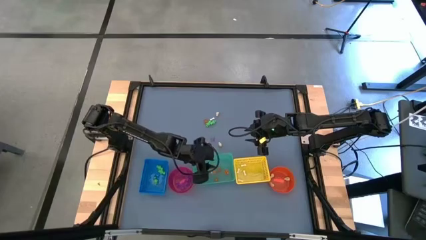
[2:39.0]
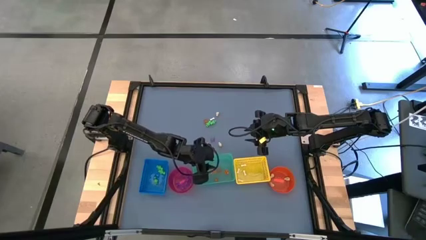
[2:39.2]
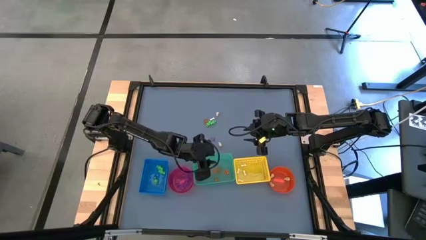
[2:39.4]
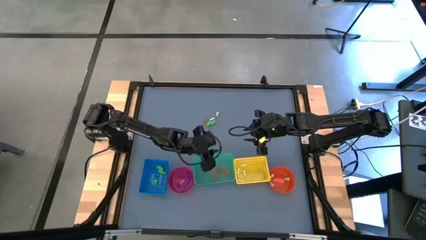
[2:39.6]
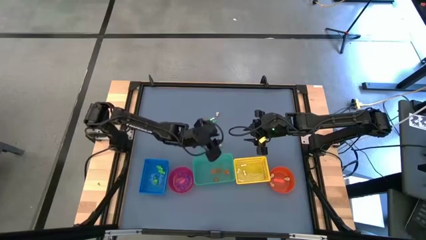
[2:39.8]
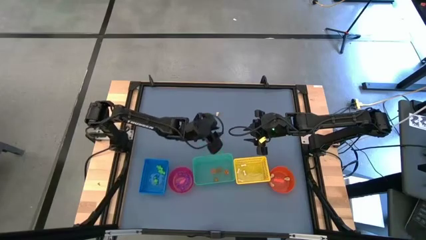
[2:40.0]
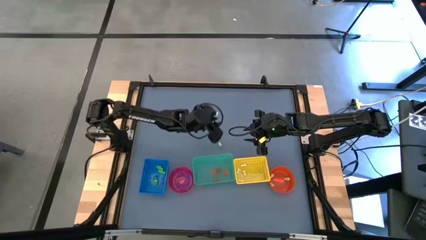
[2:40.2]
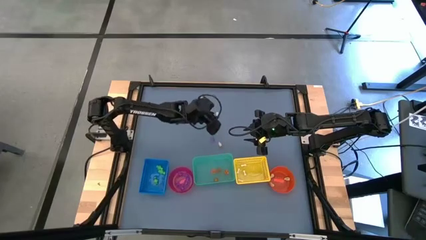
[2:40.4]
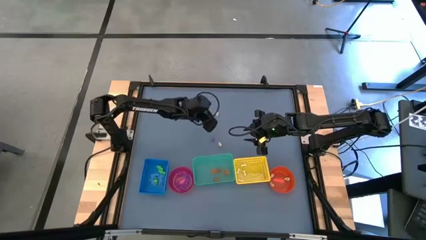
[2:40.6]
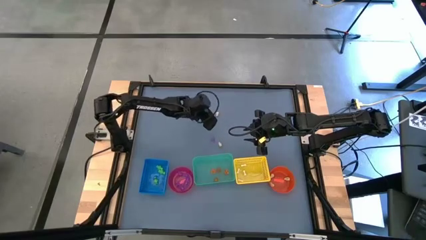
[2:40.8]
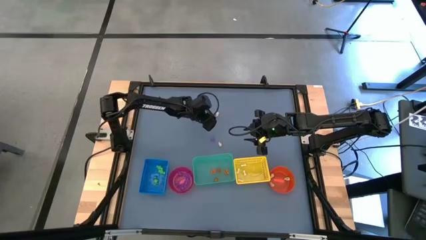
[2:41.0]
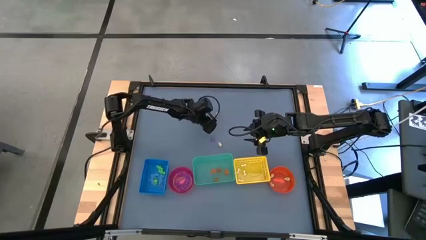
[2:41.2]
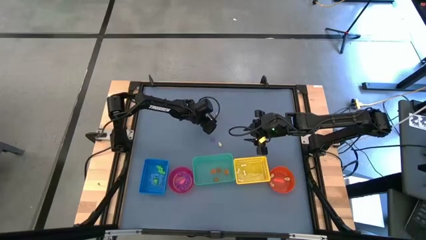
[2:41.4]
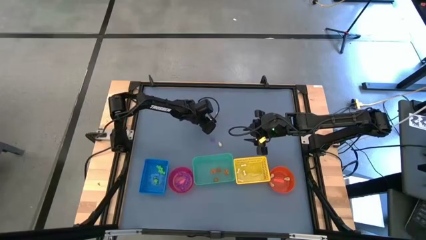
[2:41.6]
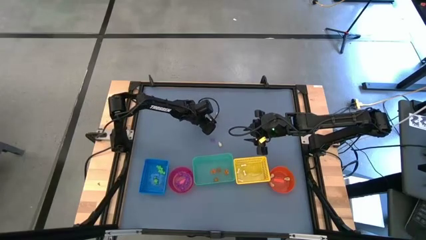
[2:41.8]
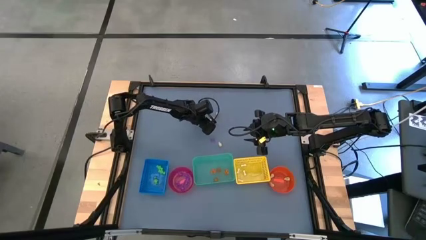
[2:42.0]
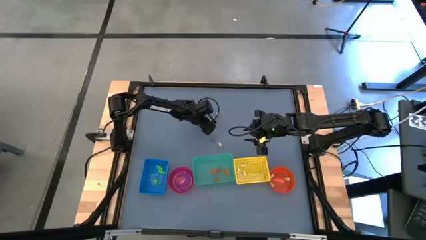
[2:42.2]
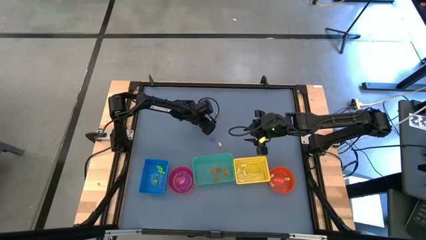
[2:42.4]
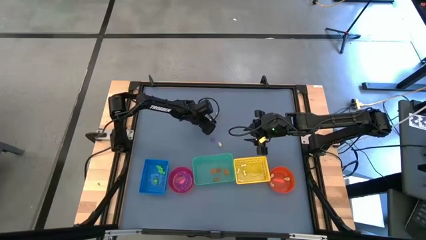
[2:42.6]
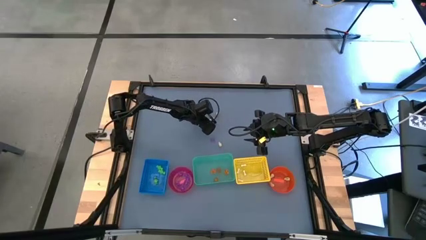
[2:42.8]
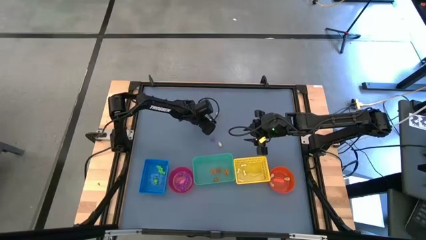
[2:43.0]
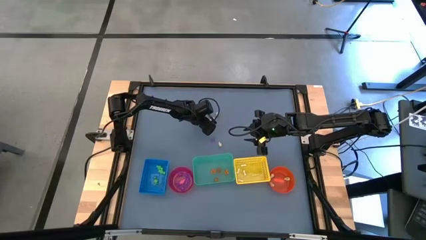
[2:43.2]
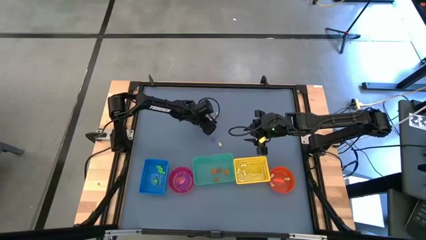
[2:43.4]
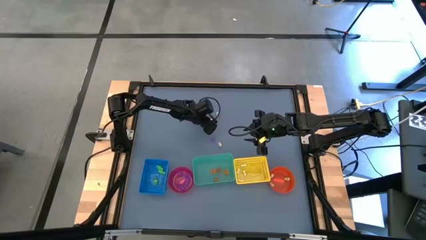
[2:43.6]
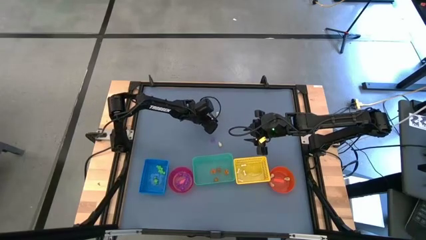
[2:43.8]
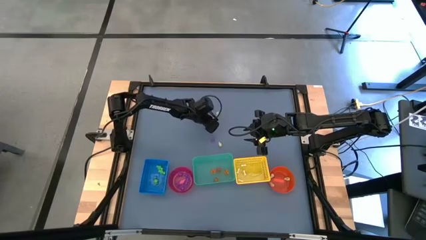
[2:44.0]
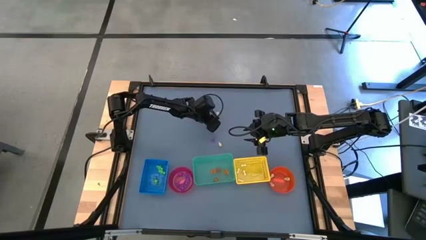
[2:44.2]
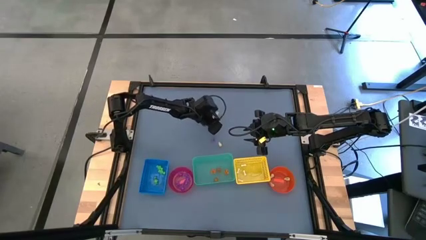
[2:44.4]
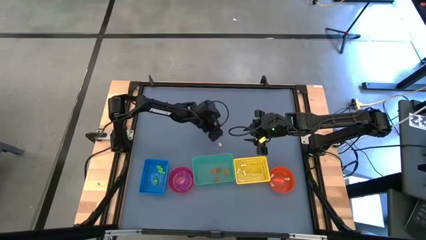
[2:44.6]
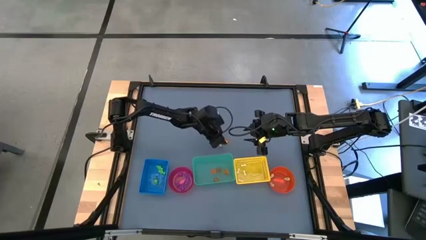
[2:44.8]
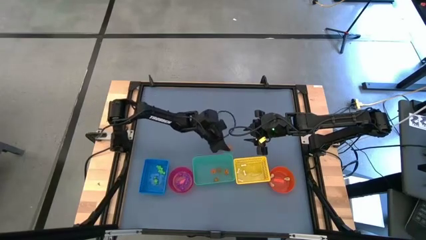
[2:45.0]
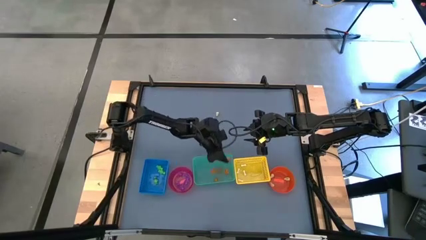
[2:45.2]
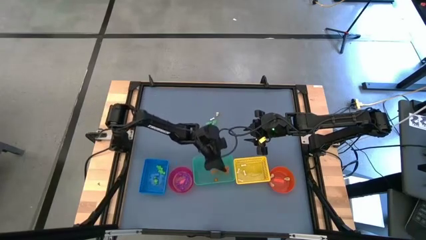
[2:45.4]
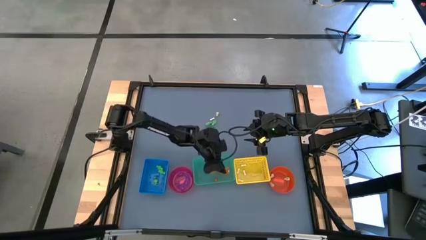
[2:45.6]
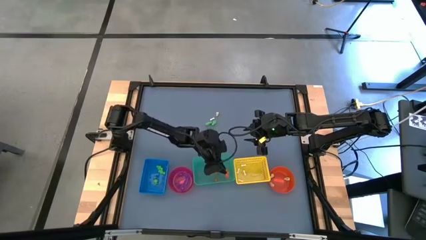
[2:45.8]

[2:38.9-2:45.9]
Task: Sort Halloween decoration
Put the orange pumpkin toy into the green bin

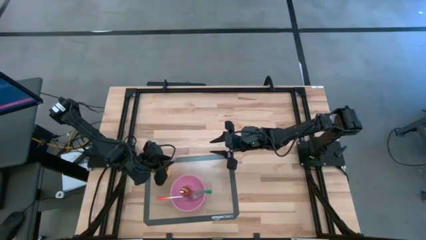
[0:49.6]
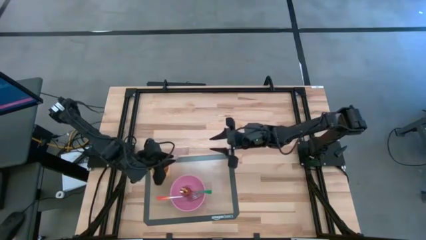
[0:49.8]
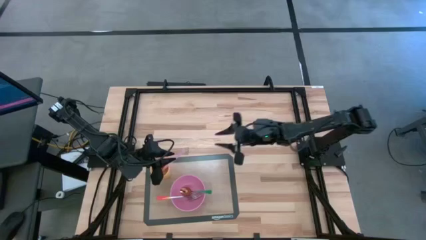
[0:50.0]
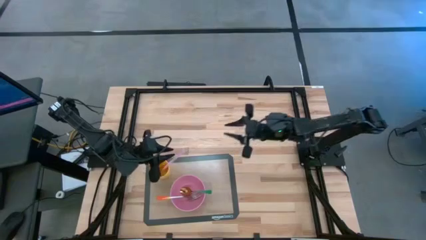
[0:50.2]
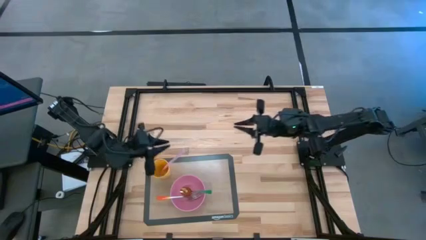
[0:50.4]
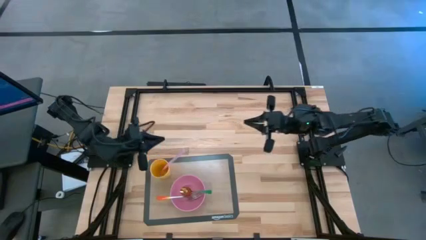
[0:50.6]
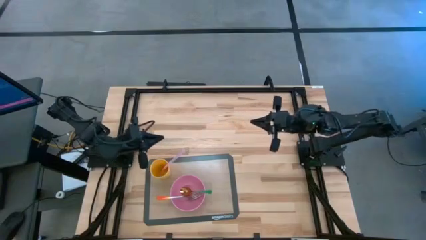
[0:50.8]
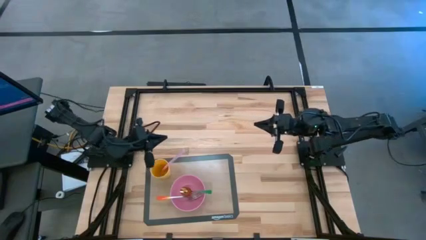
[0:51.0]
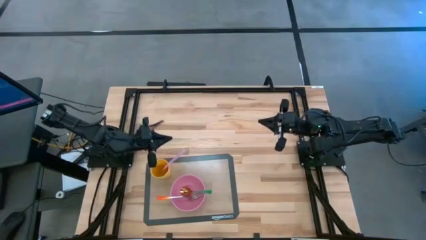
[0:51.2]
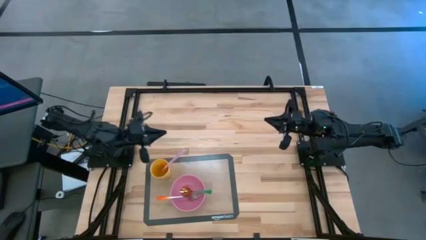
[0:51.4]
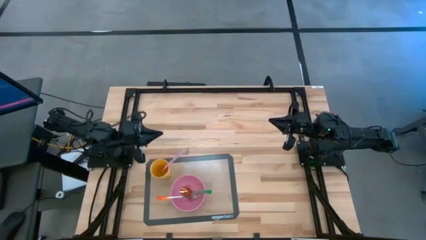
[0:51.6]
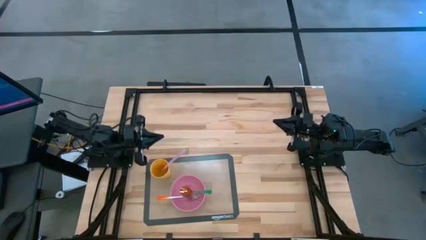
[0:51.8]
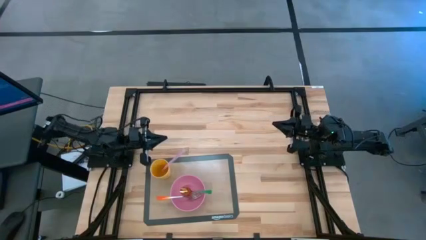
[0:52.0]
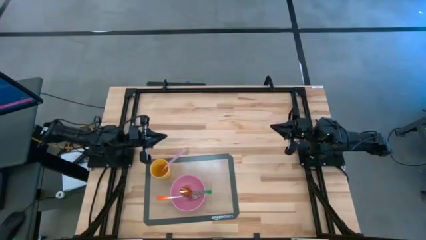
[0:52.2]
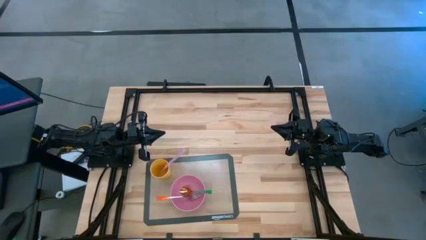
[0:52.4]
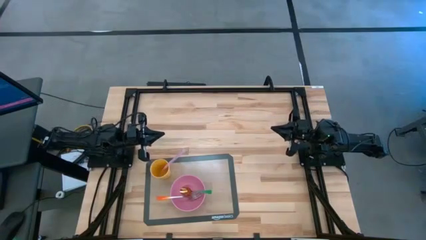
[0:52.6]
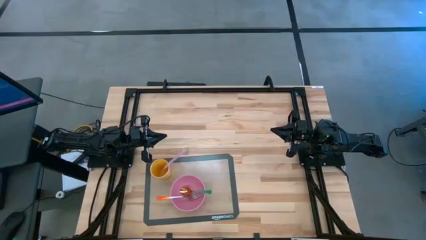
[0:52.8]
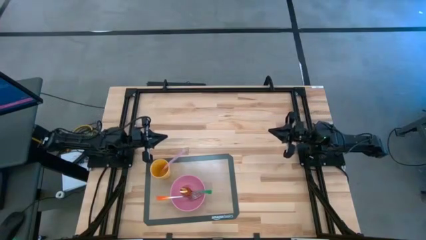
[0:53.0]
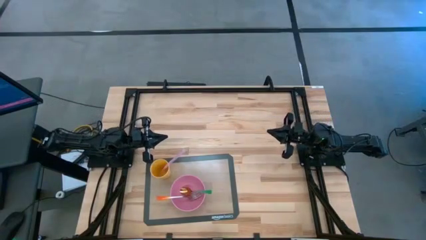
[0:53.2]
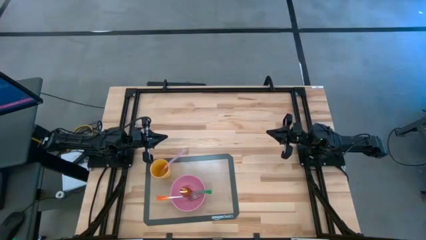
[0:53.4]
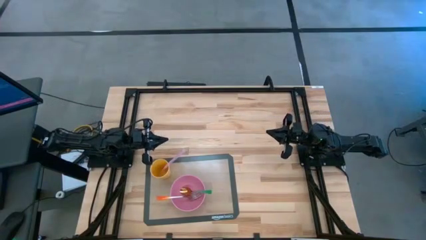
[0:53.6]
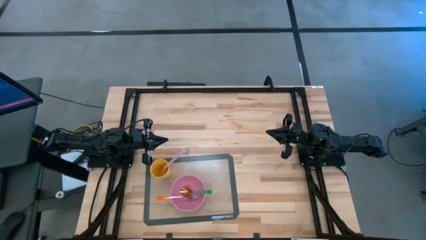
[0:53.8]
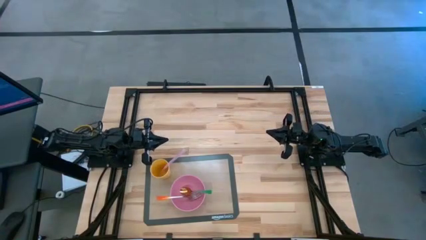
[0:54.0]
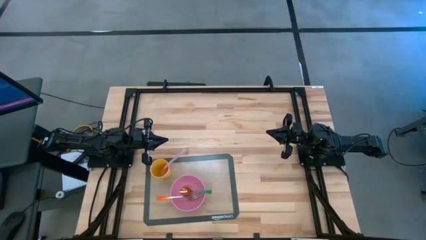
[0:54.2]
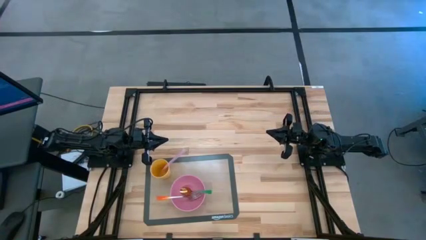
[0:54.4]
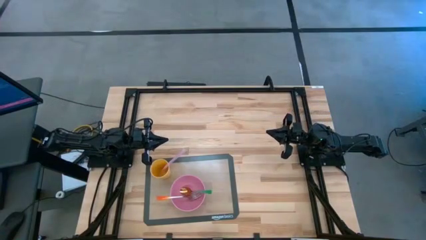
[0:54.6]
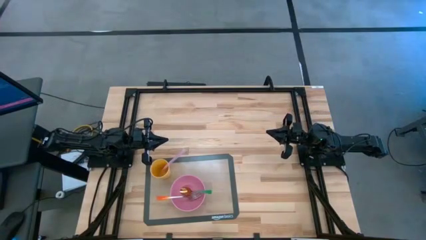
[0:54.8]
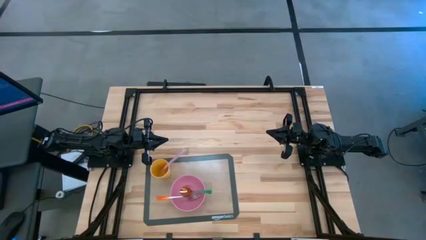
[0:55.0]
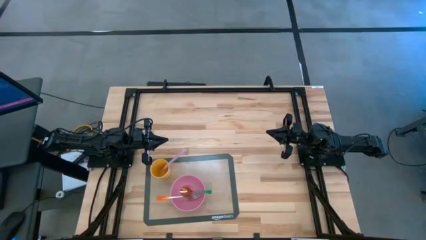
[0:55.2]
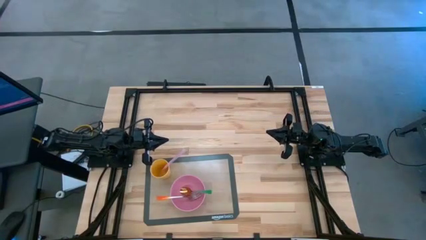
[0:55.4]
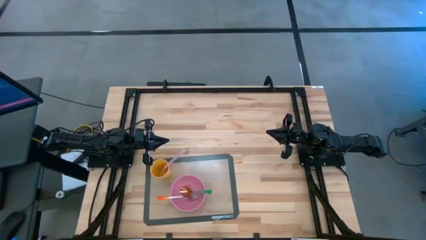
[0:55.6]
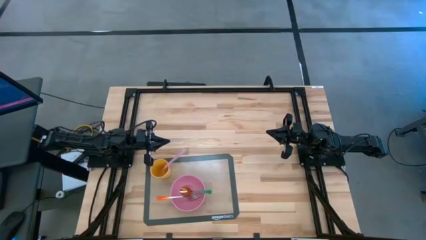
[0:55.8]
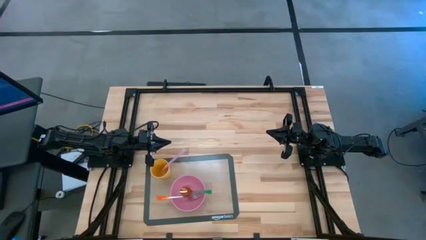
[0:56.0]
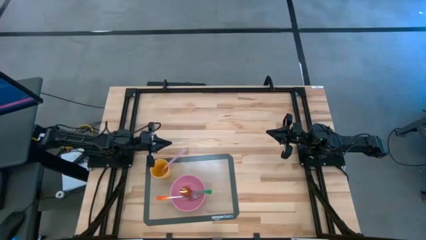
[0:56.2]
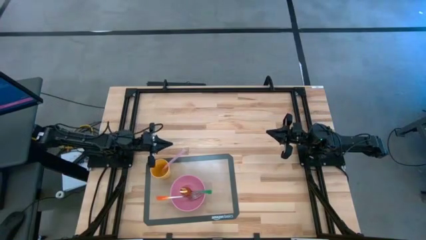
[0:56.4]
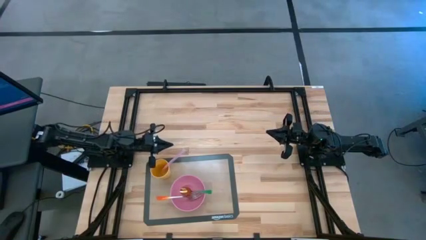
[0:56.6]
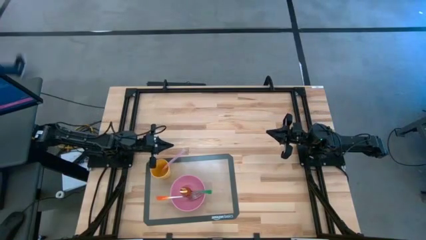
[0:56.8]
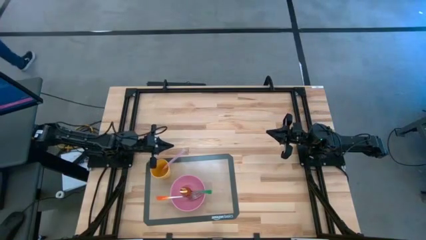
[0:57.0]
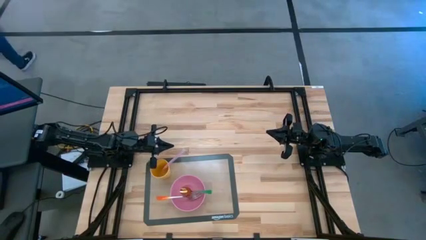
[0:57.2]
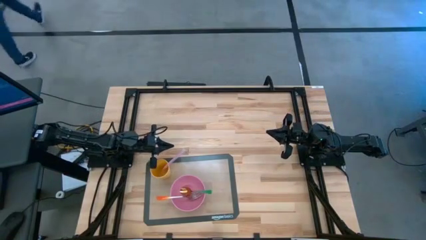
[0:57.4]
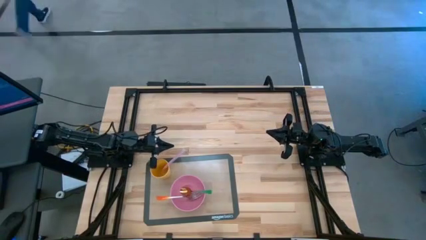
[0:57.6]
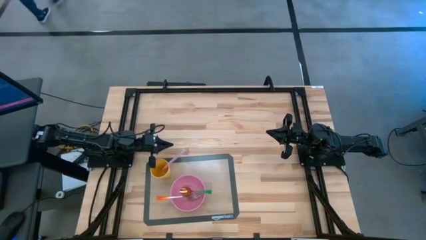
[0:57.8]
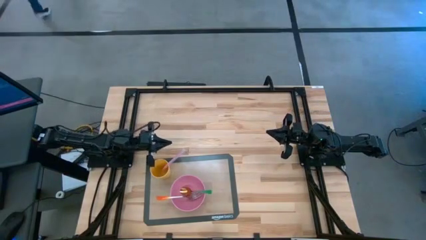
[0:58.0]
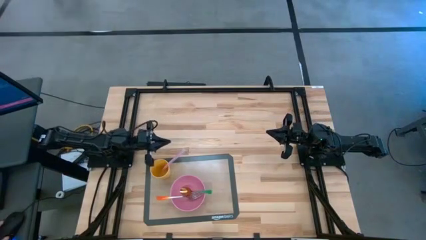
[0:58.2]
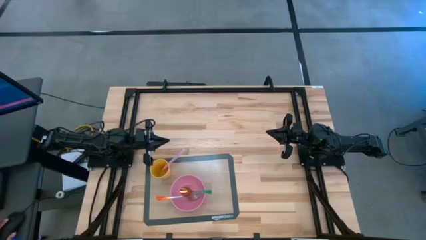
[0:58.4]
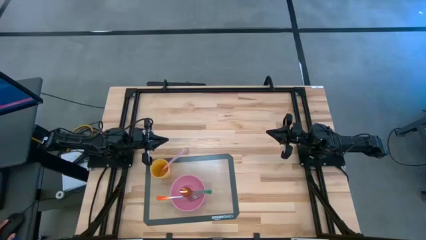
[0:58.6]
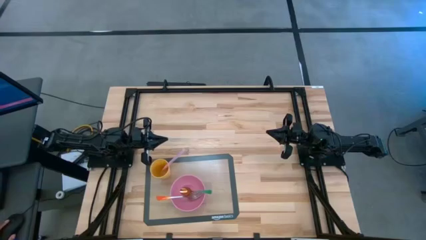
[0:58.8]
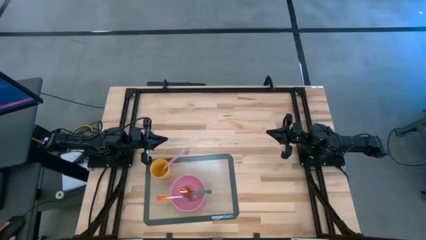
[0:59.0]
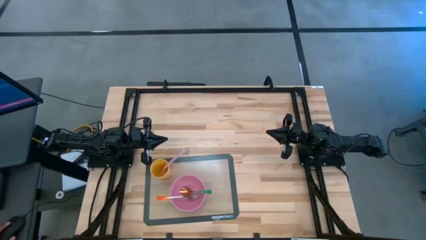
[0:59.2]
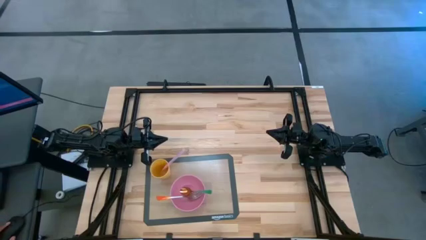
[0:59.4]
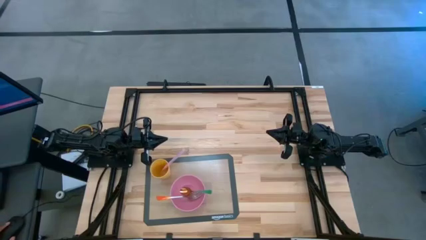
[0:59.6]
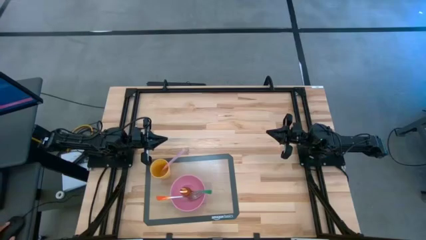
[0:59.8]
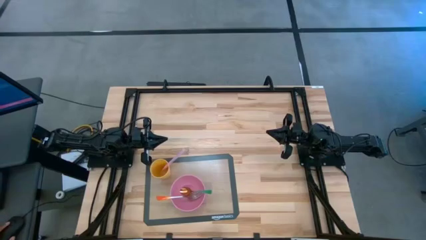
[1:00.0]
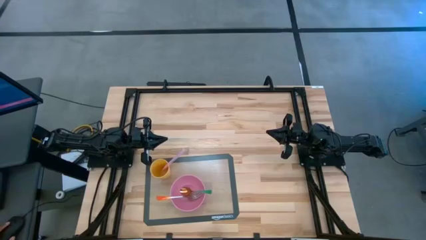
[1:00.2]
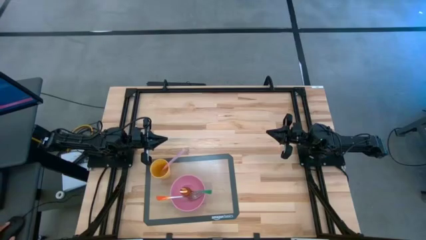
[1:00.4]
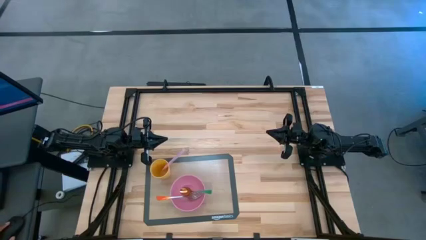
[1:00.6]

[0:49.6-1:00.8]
Task: Pick & Place Utensil
Return to Home Position
